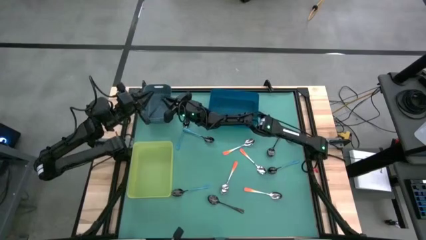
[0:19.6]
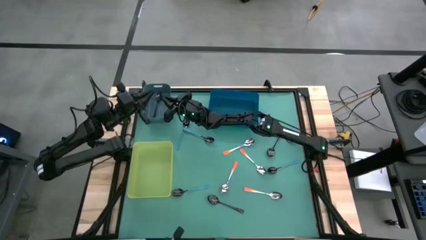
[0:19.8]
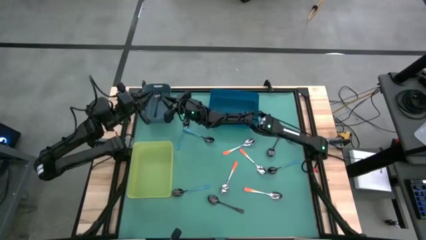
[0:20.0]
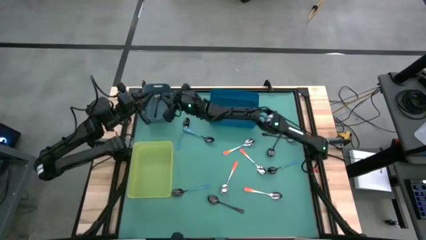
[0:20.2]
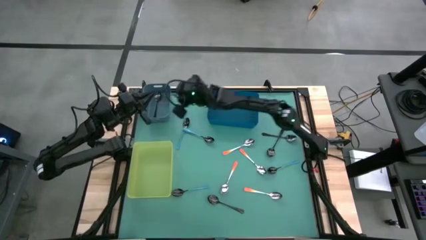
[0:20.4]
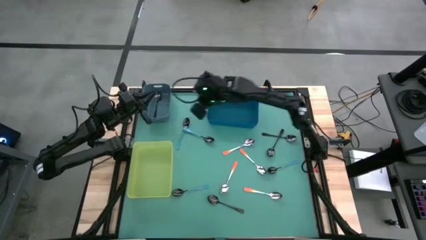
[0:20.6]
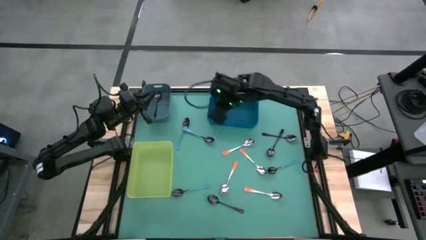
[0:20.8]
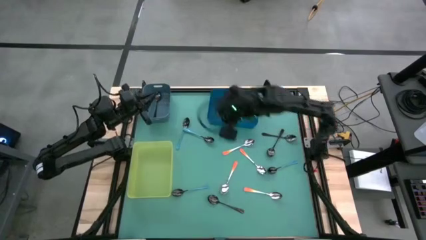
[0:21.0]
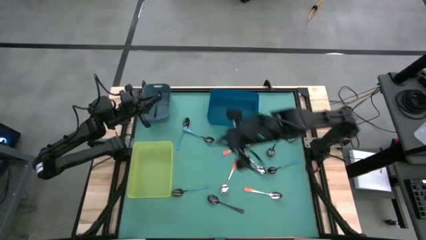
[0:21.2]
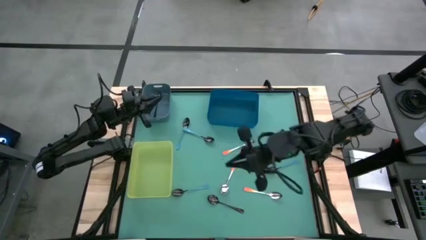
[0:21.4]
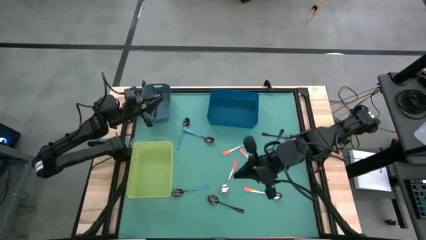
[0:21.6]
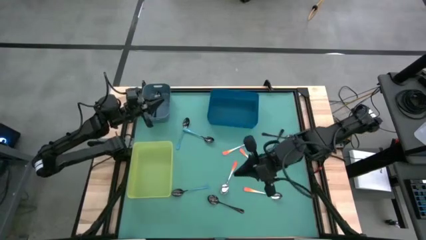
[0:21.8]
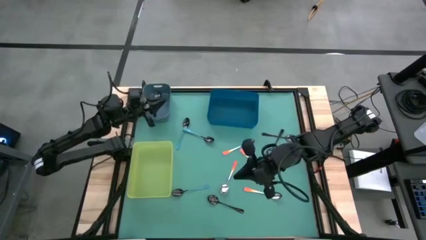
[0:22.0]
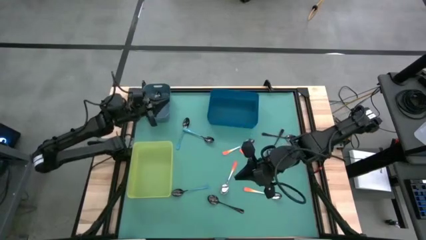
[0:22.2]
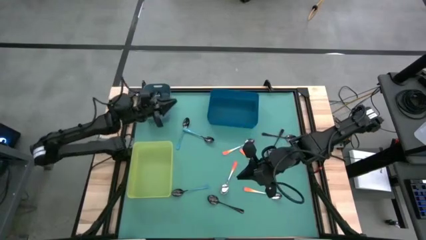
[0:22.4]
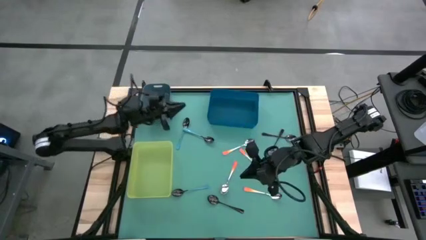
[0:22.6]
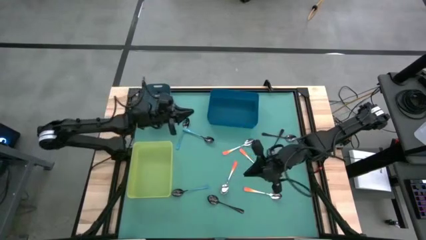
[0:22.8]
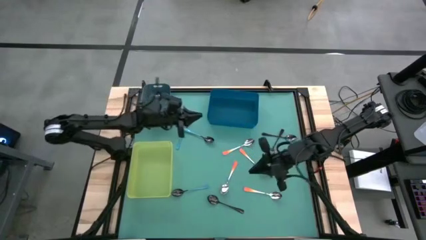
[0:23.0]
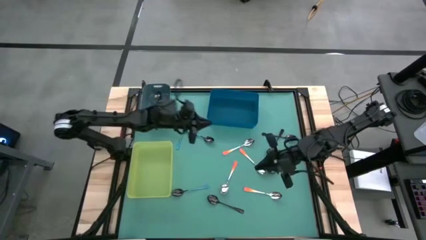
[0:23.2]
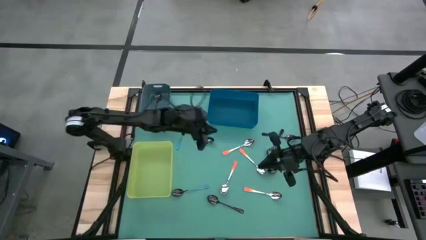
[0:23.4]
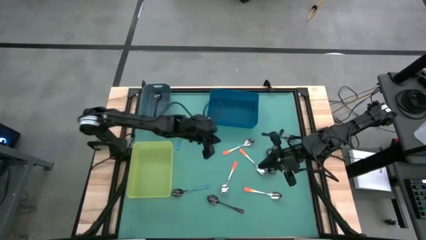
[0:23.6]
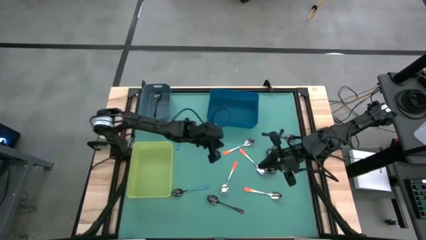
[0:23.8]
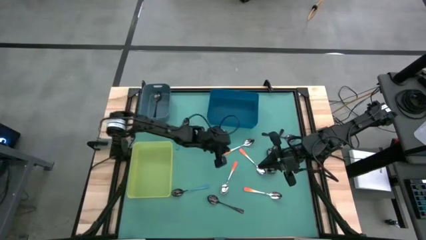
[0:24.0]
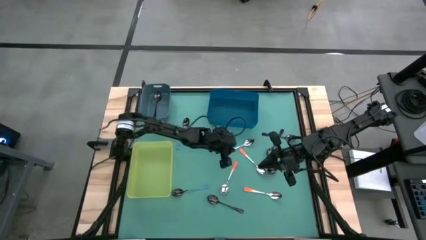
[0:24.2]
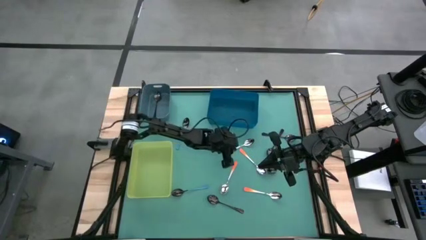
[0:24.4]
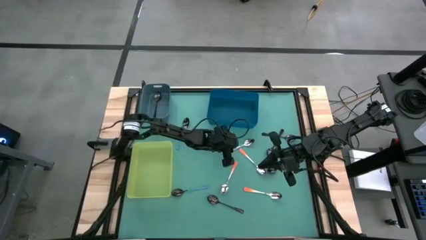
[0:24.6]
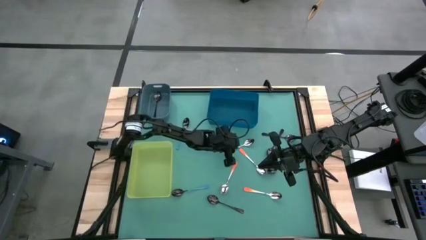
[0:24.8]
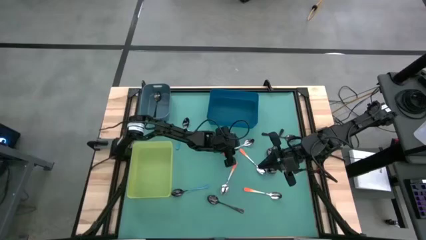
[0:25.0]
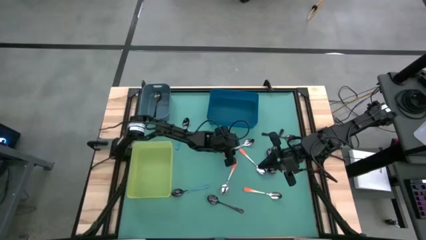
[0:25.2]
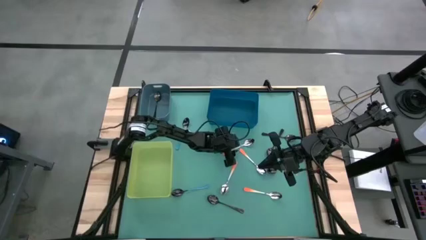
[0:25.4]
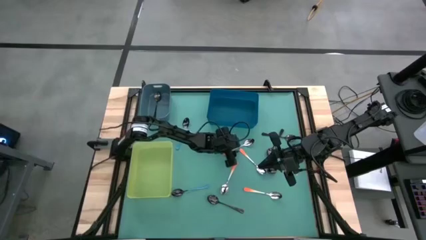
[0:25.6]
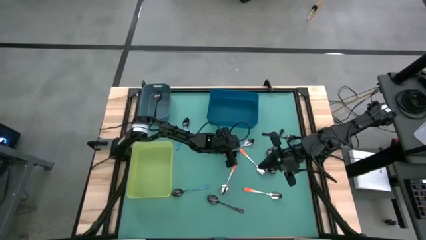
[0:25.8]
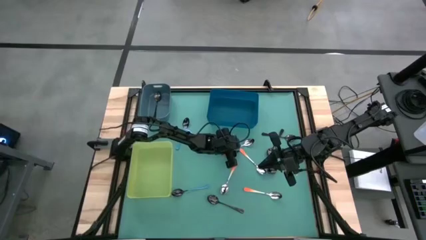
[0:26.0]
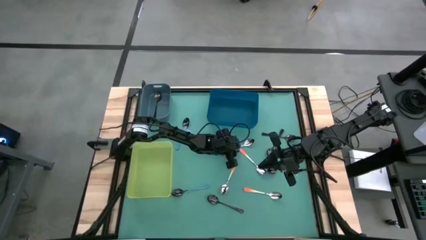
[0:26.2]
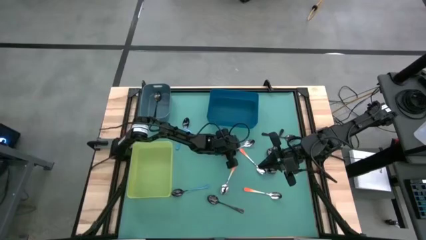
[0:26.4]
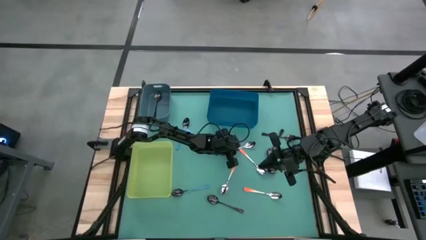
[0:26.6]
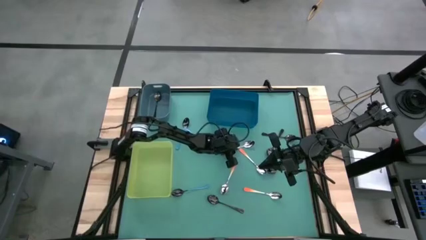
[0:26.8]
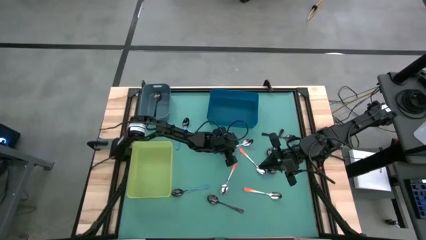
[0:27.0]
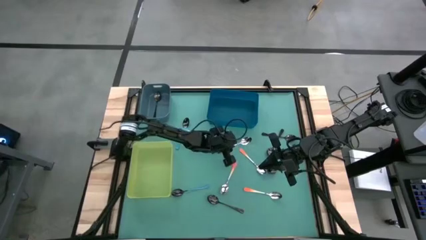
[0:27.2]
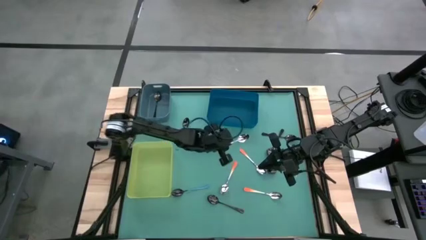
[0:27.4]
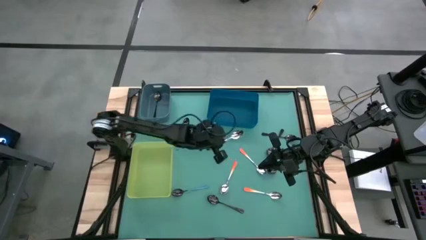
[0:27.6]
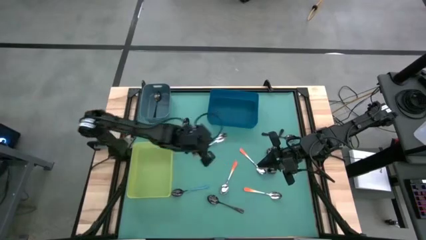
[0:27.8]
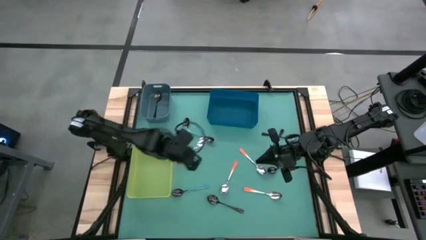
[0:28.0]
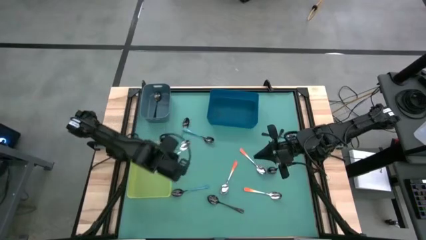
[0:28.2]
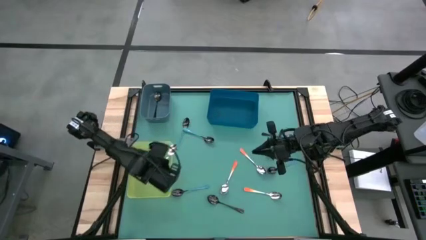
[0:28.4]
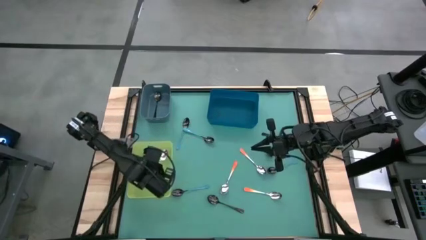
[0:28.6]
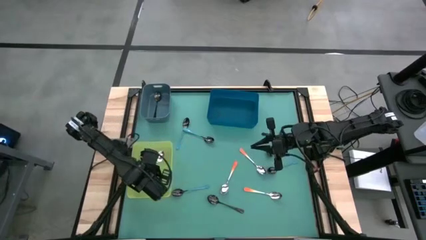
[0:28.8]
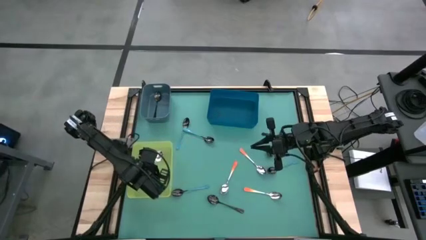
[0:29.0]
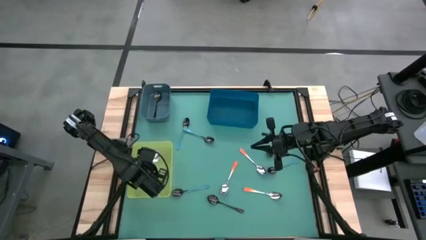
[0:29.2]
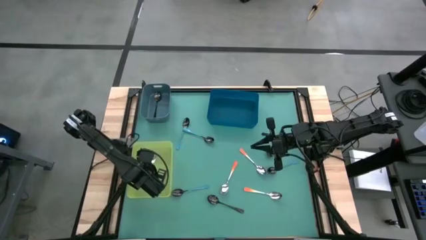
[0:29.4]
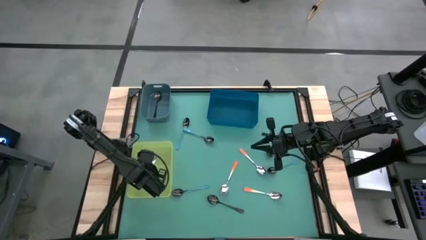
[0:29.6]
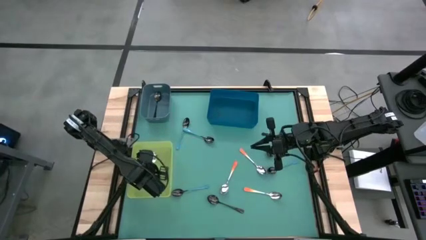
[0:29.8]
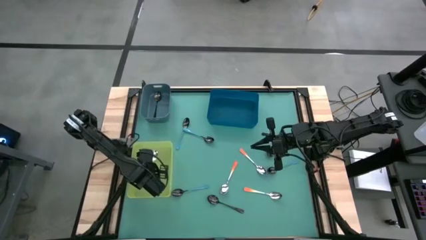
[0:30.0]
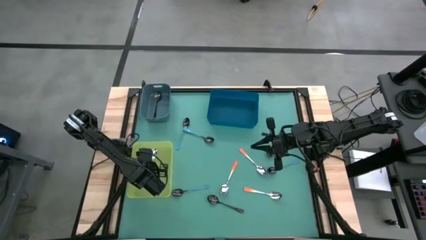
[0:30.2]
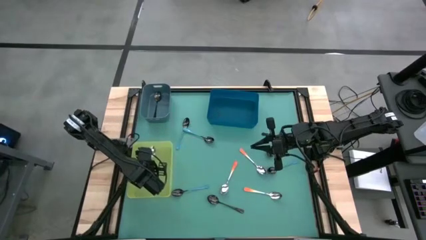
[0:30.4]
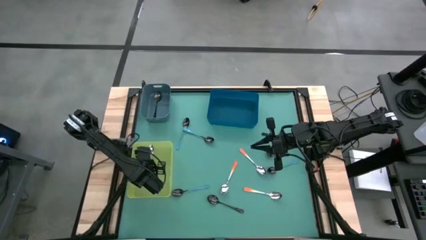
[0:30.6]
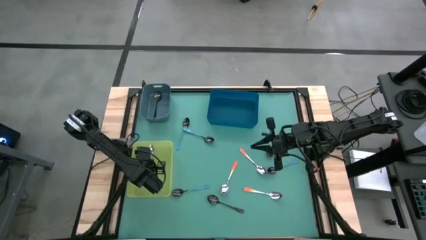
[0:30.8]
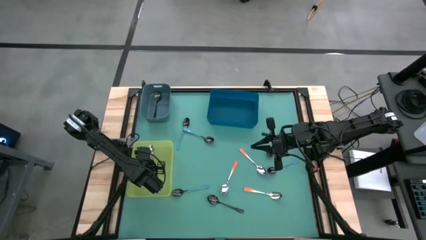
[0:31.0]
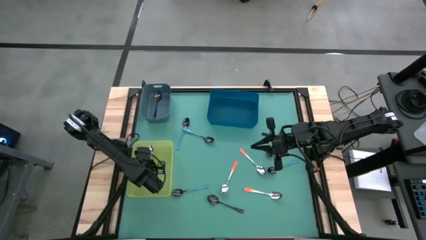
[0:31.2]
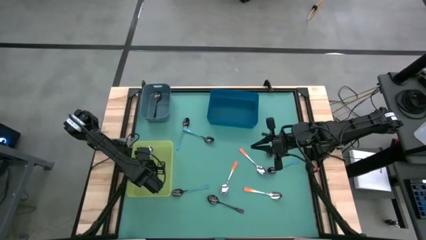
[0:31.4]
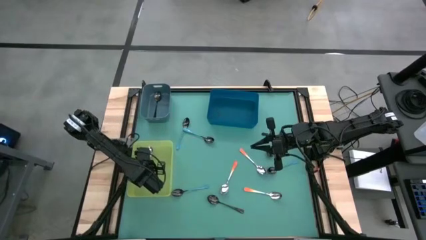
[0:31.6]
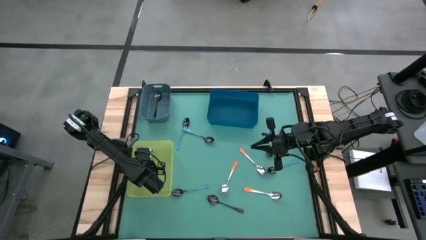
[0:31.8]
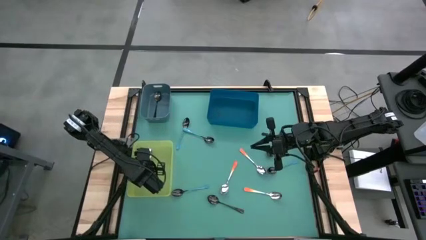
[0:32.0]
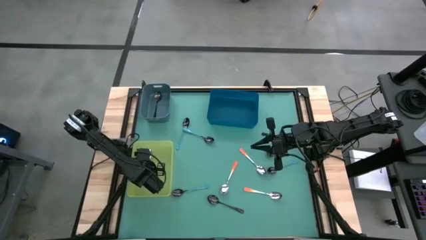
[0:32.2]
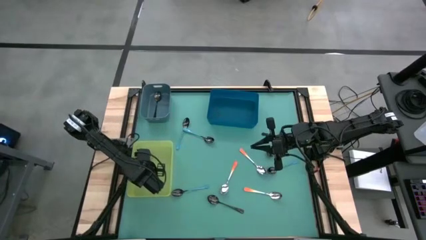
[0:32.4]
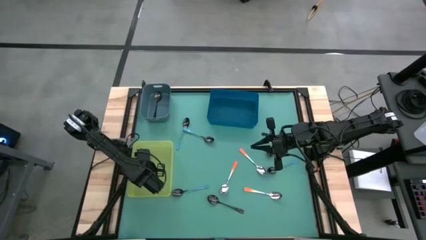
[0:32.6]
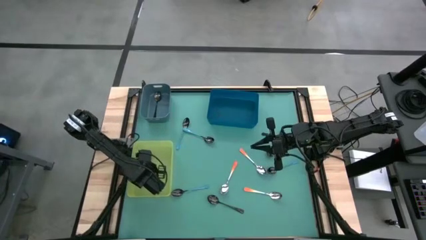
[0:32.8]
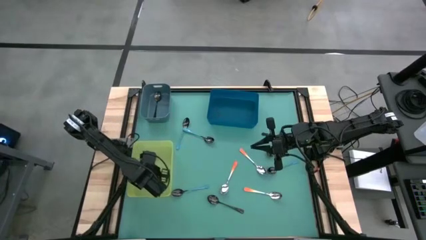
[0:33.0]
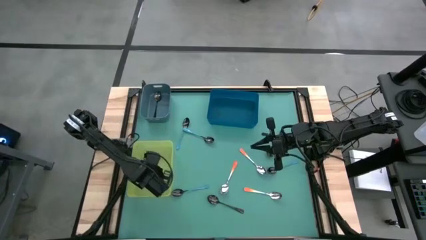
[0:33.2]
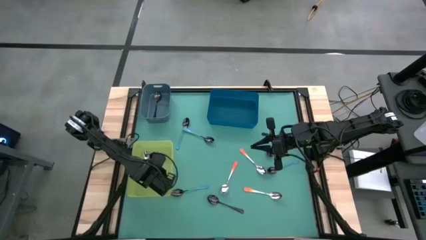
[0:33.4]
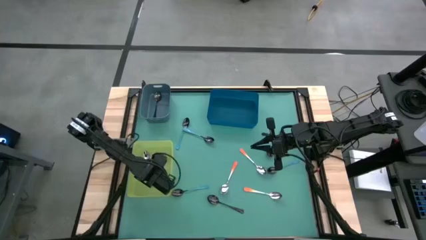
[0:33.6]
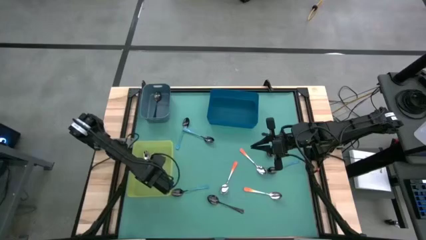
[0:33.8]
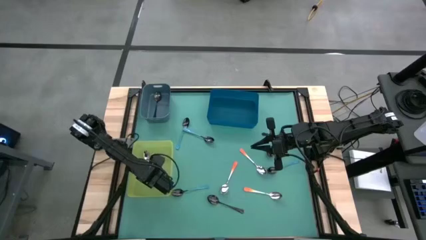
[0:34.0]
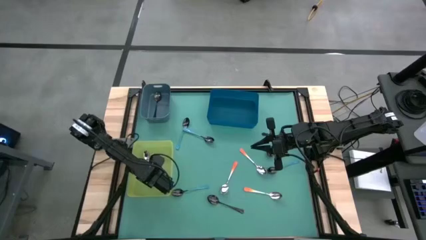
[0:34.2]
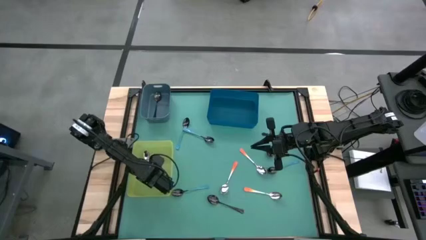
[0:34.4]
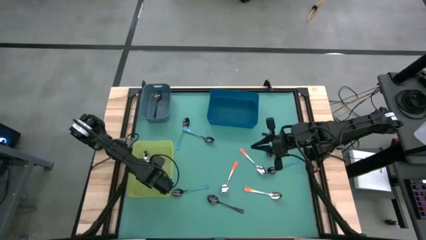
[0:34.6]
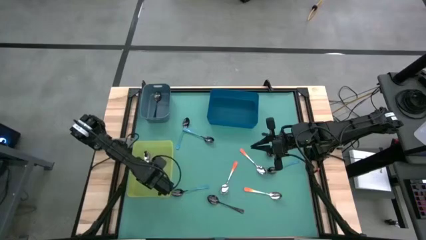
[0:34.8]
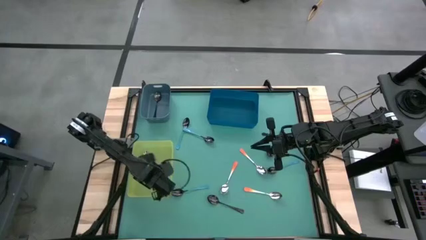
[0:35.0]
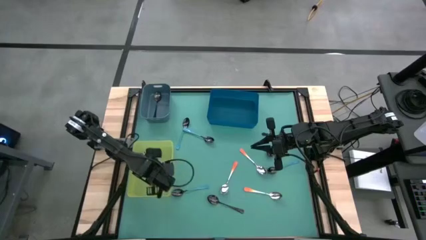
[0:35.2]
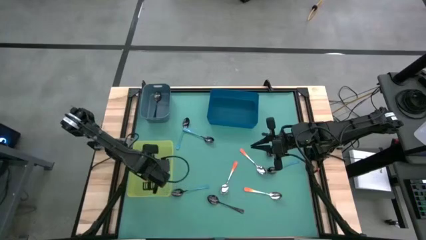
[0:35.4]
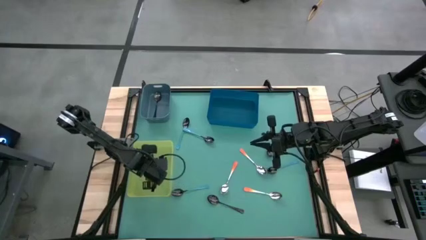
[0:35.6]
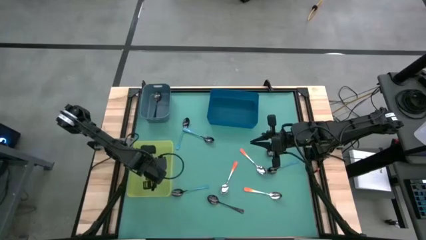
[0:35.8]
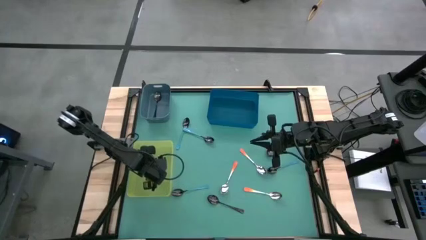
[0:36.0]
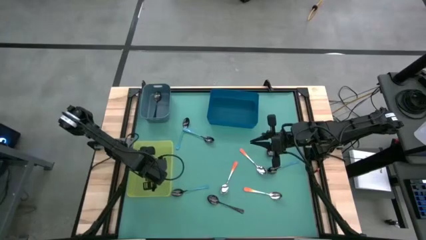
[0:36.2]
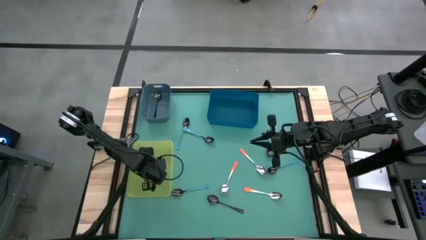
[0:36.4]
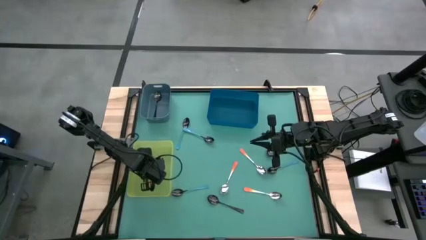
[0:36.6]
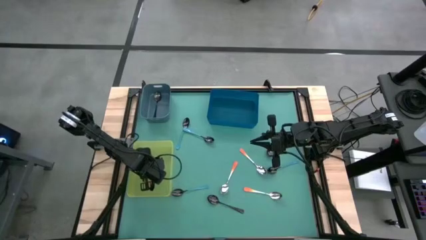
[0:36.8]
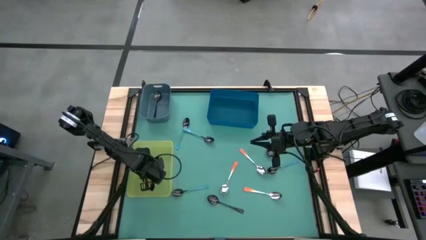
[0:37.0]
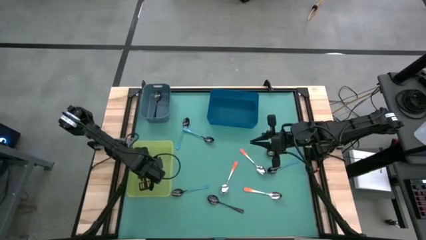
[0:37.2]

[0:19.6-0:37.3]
Task: Sort silverware by color (type)
Put the orange spoon into the yellow bin
